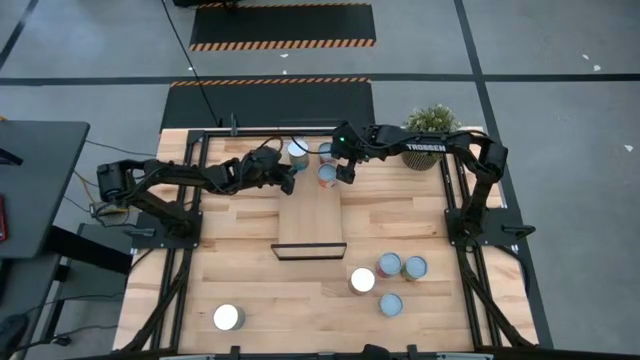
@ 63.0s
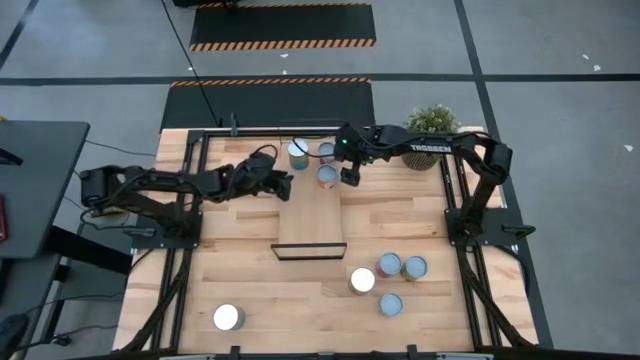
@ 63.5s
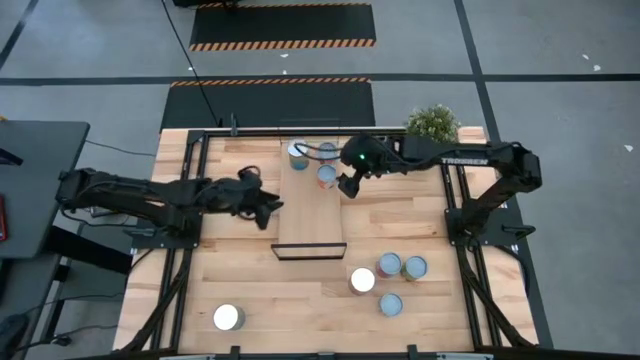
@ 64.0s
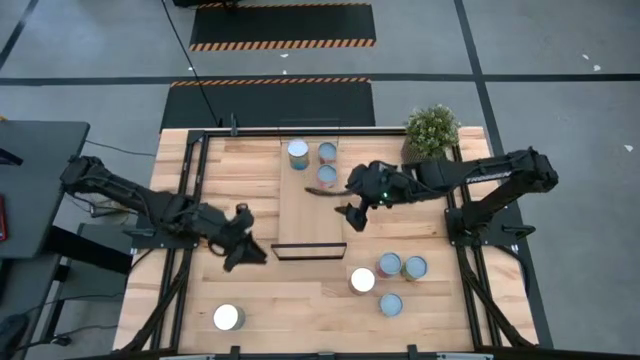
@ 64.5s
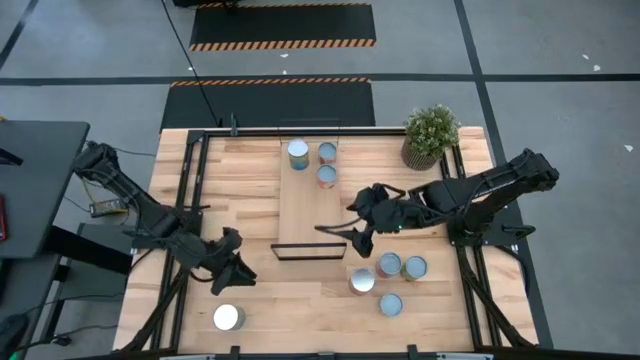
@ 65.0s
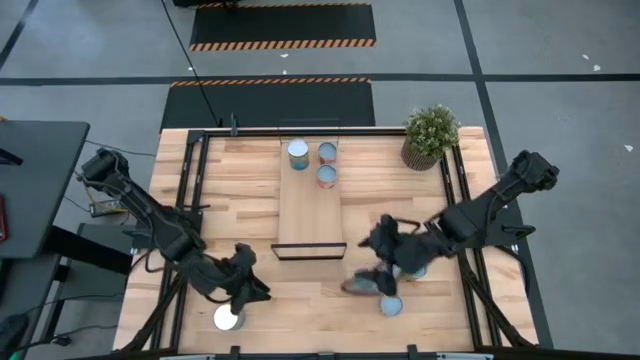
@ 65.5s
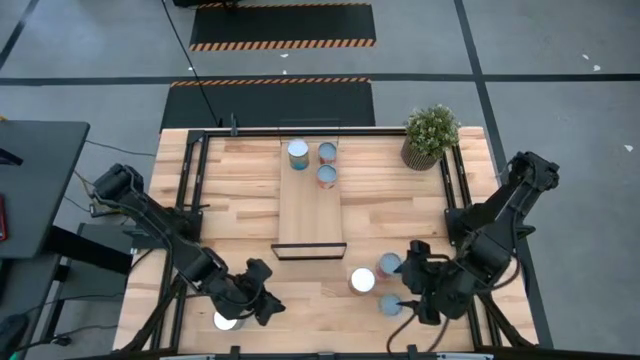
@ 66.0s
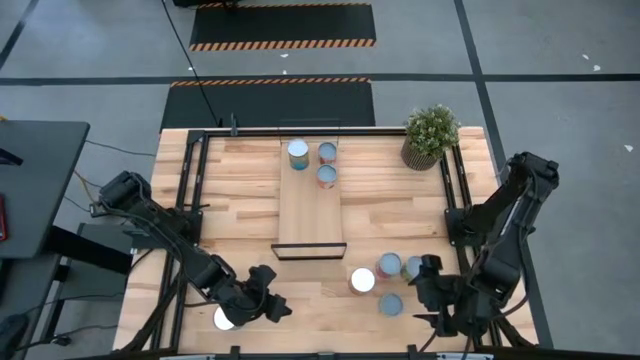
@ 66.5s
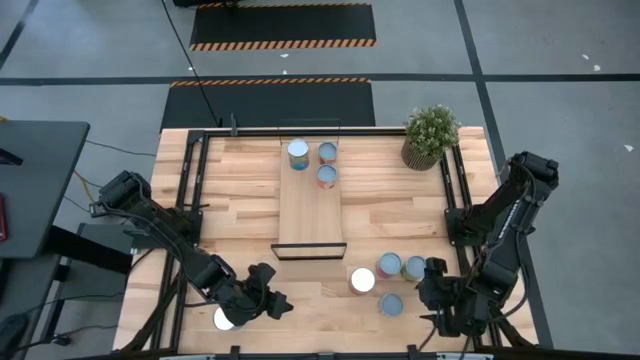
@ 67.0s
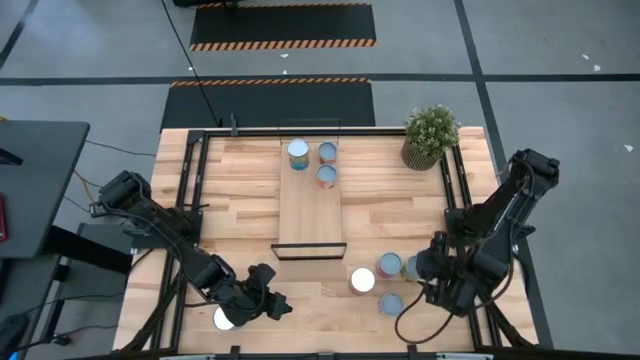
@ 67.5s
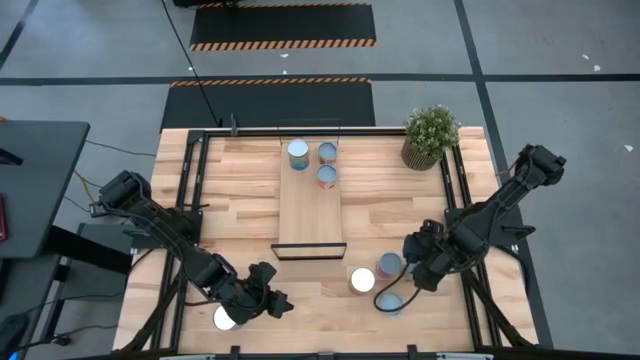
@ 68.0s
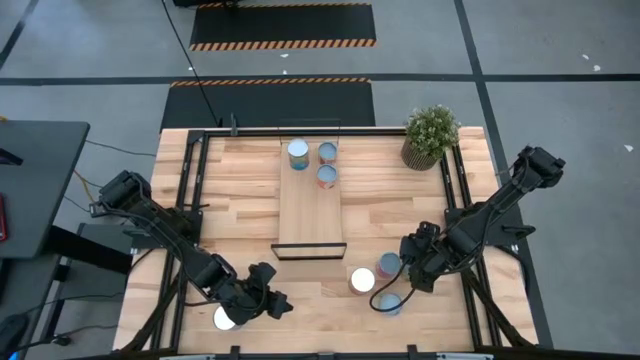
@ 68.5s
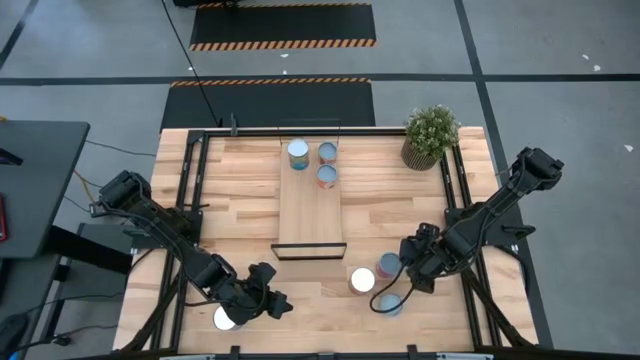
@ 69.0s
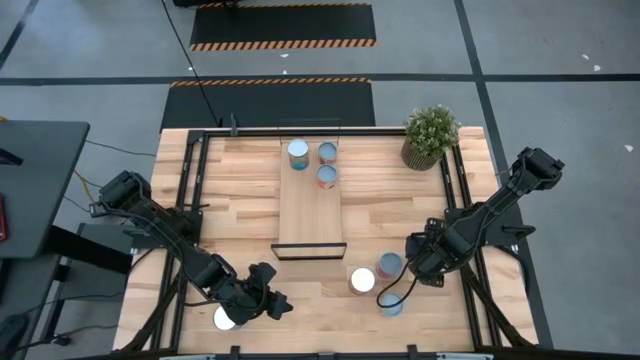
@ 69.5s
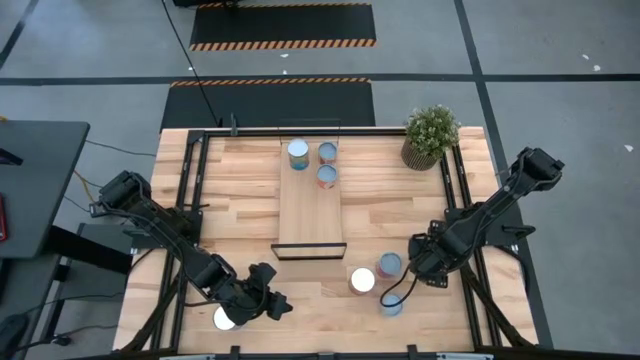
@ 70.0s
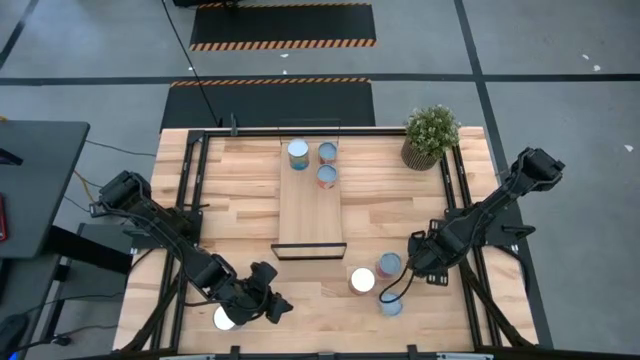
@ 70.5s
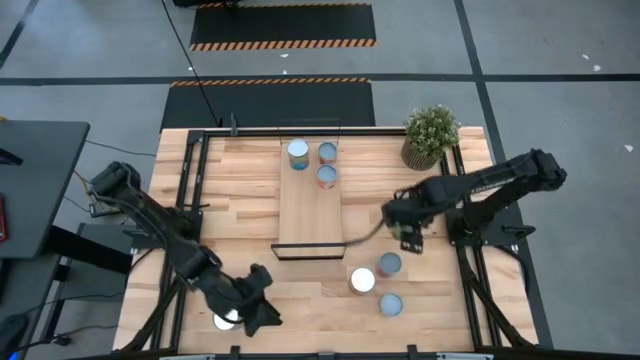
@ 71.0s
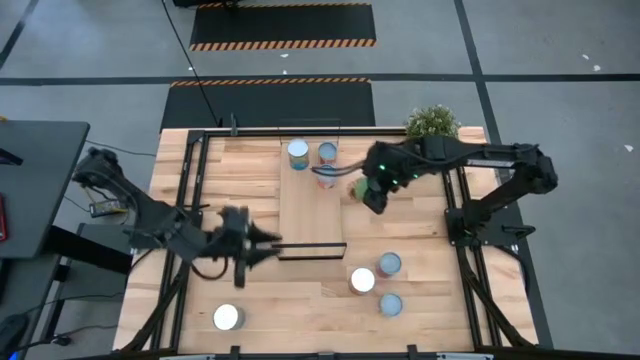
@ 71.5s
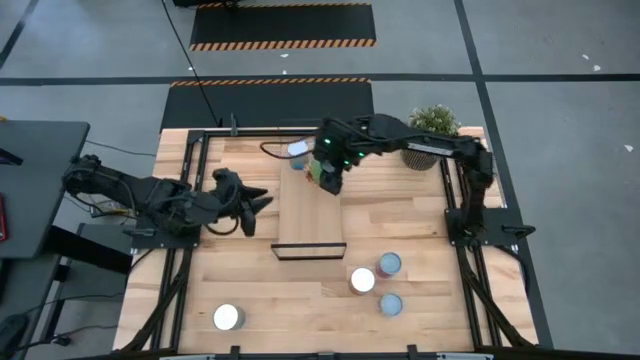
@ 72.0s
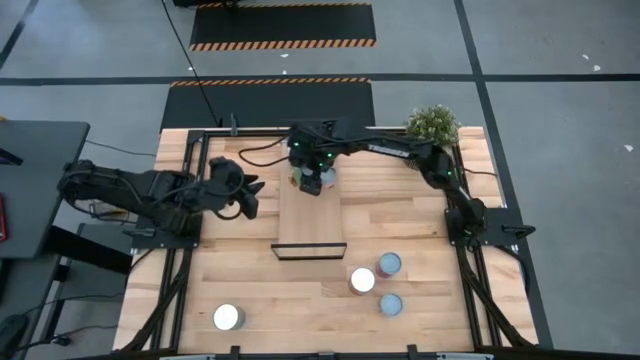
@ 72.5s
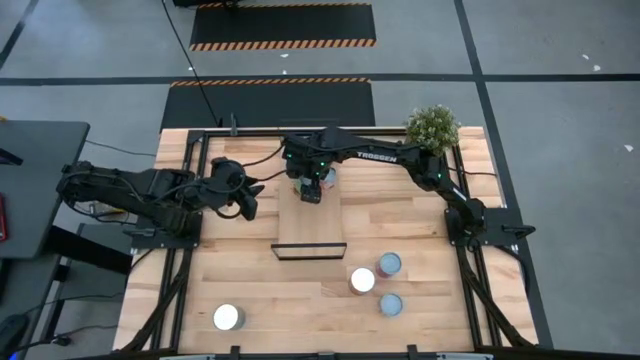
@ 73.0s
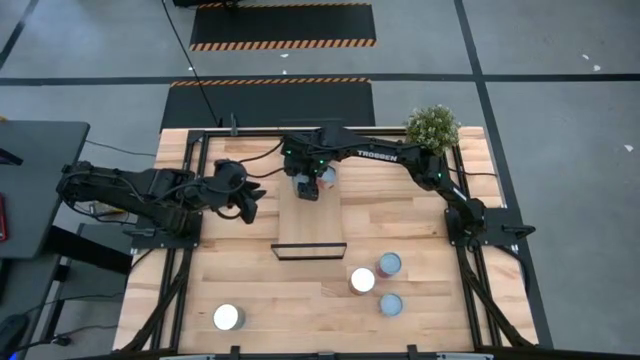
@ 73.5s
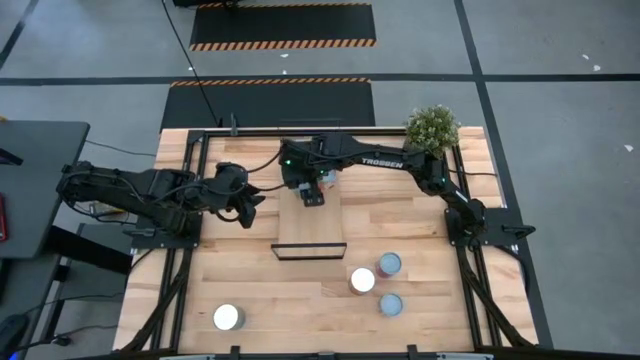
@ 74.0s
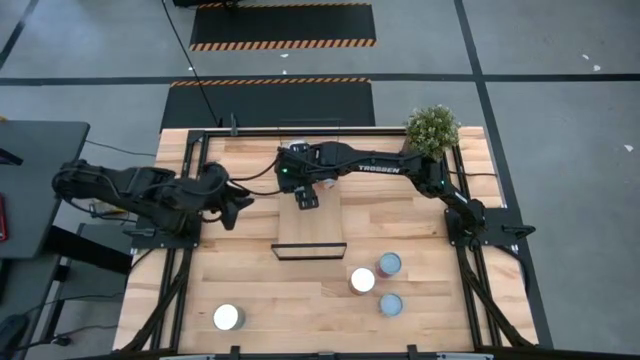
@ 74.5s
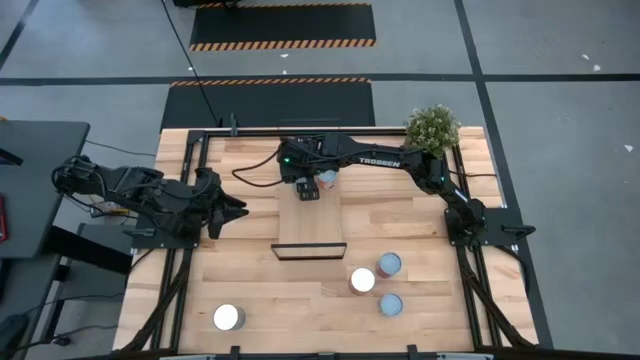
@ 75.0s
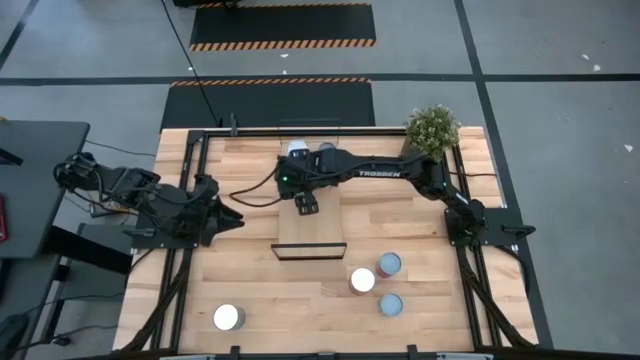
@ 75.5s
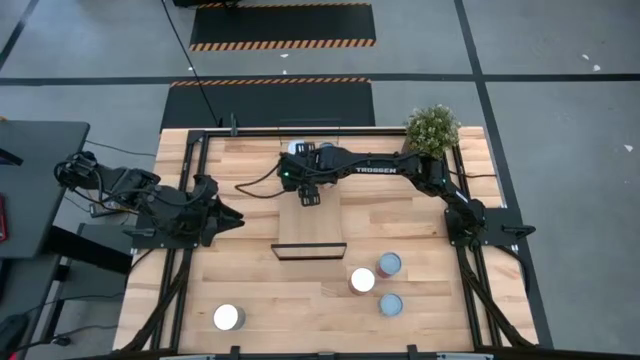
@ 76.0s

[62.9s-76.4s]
Task: Pick and place cans onto a shelf
Put the red can on the shelf

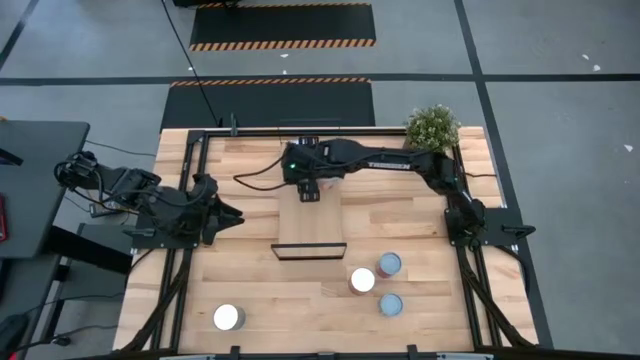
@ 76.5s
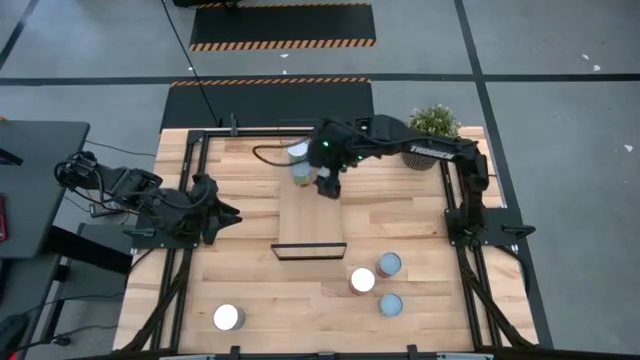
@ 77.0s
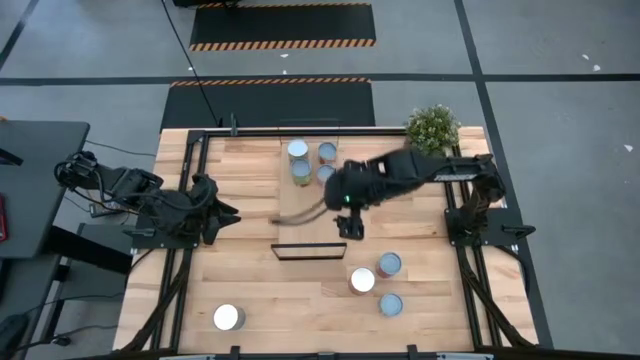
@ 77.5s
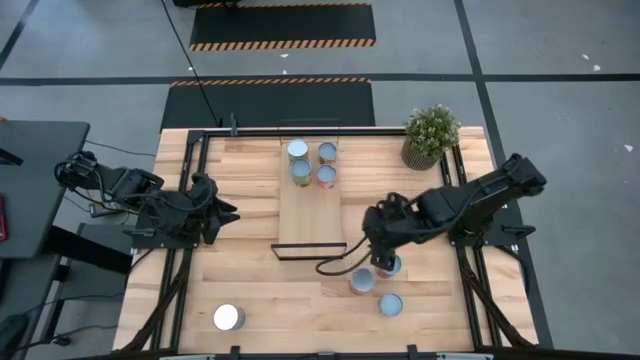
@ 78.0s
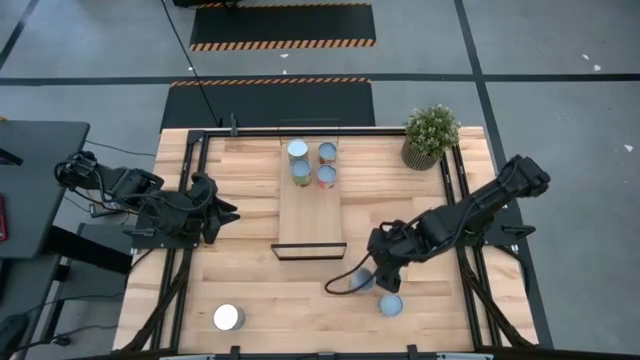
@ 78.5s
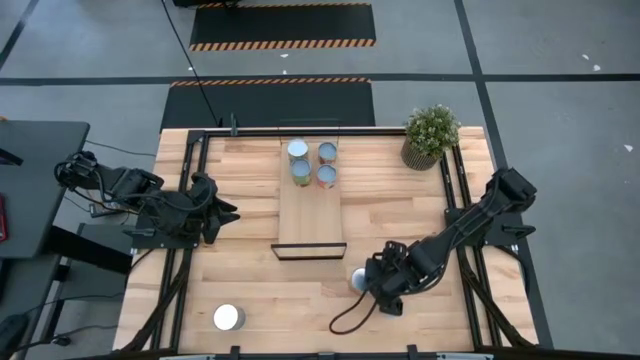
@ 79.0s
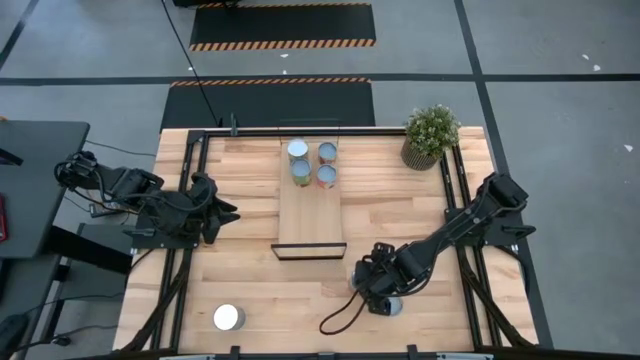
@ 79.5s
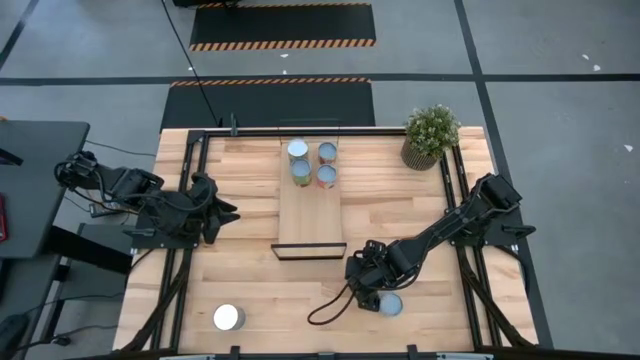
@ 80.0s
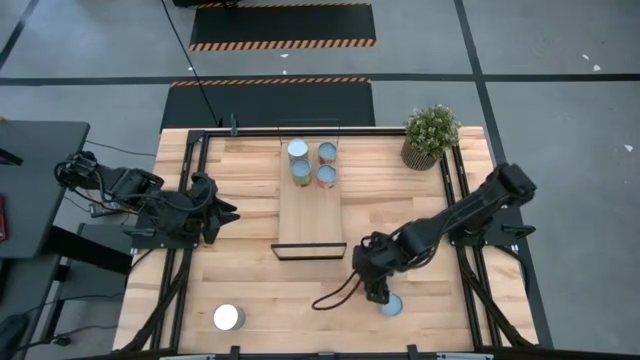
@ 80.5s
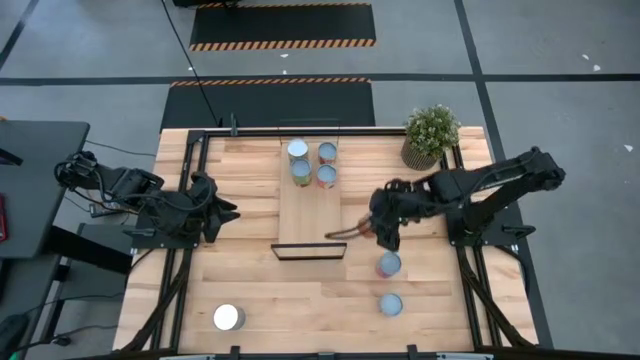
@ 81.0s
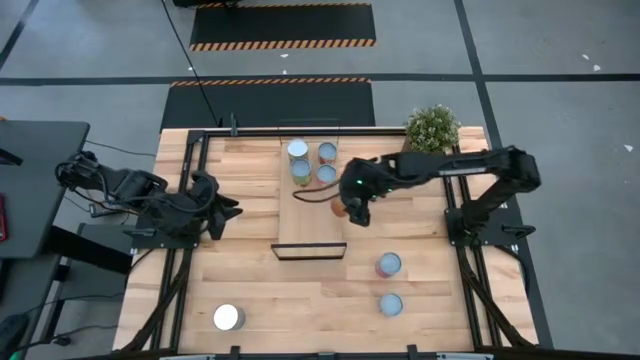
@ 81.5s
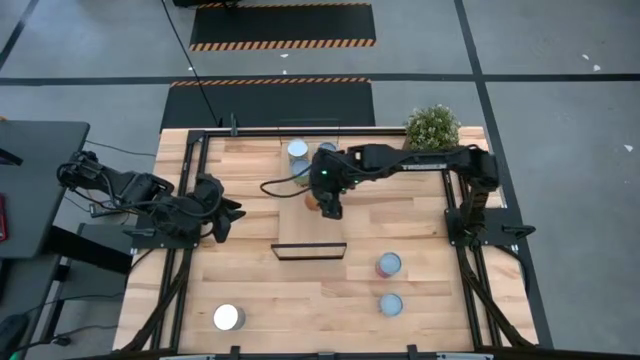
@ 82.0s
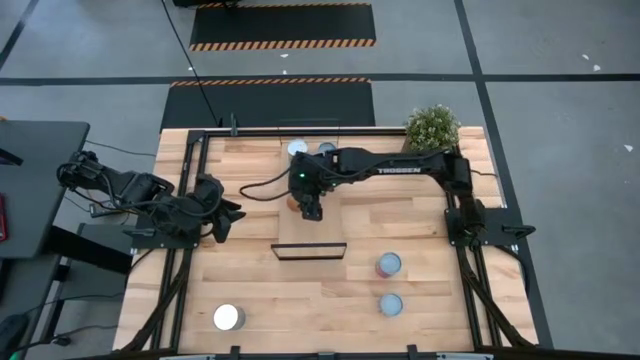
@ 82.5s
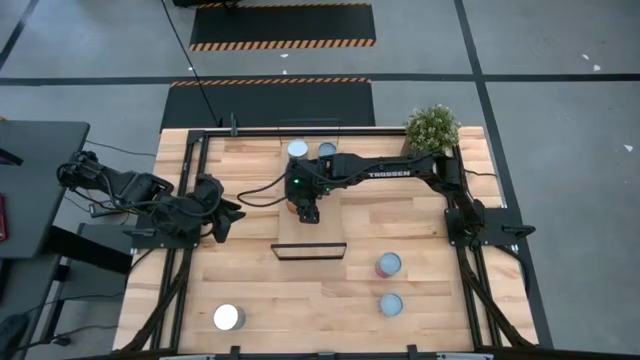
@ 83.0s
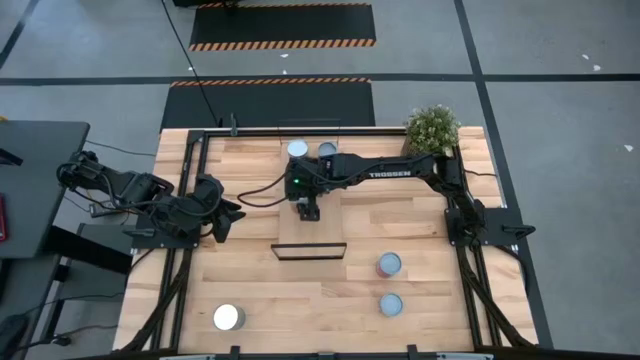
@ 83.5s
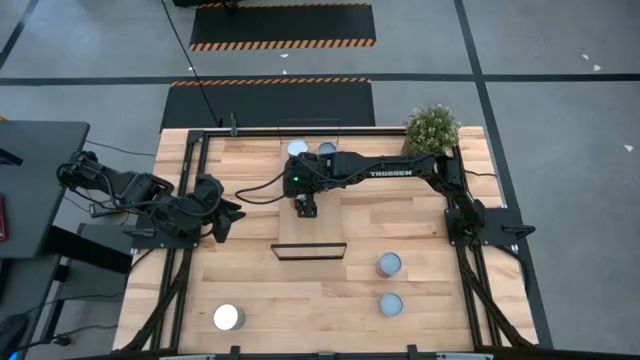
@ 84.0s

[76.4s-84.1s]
Put the blue can on the shelf

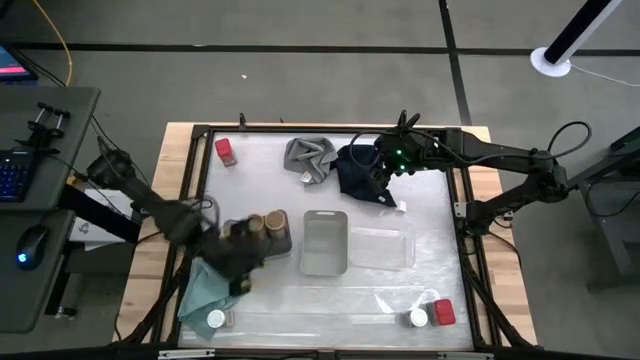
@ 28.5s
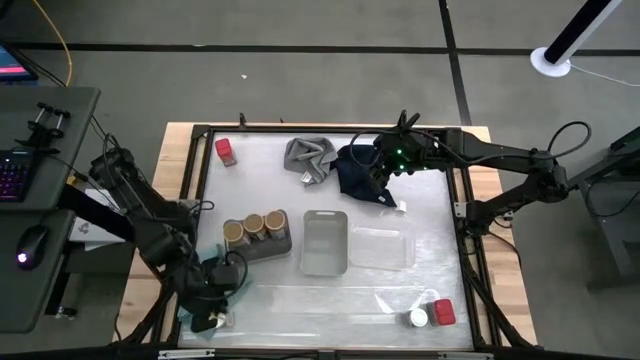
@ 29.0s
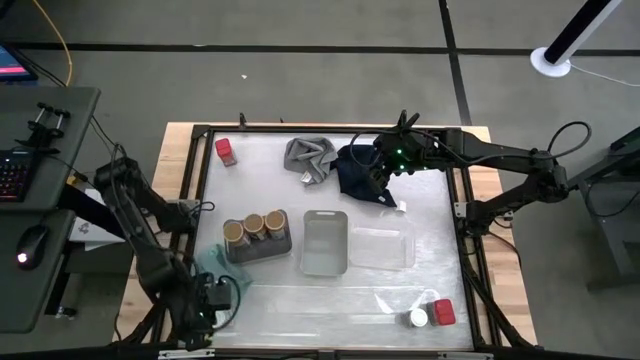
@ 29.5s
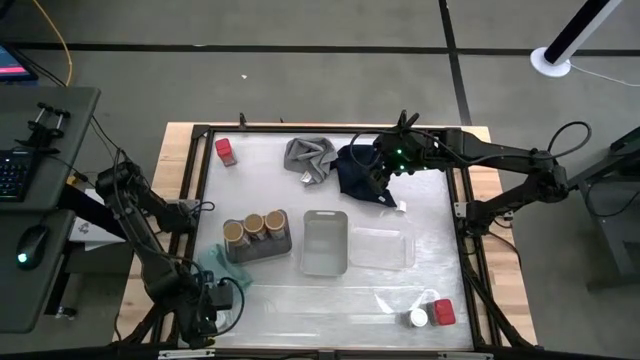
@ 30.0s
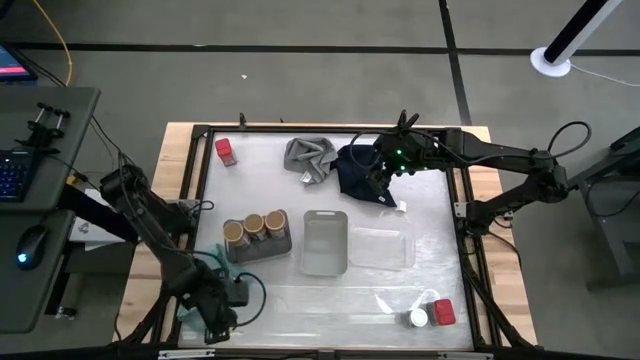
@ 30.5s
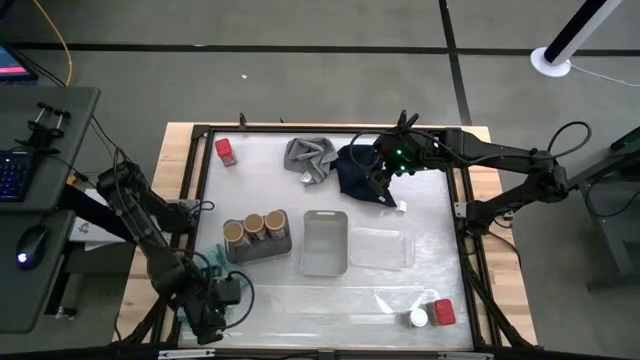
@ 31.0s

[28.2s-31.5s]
Task: Sort spices by type
Put the left white seasoning bottle into the gray bin
